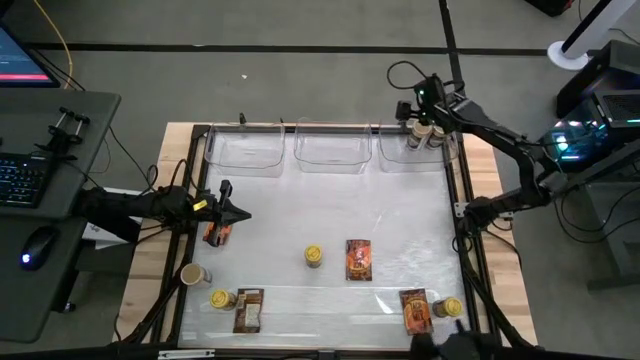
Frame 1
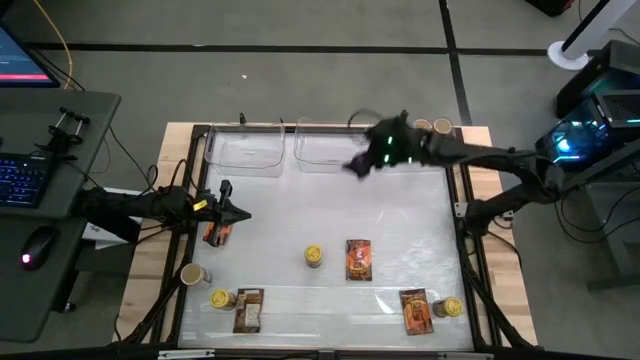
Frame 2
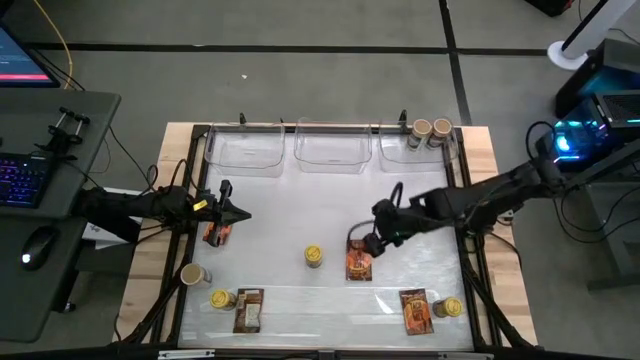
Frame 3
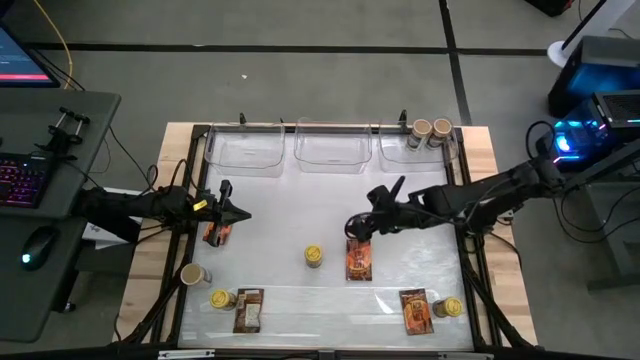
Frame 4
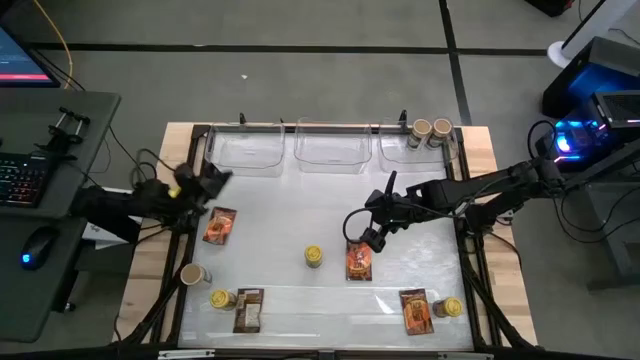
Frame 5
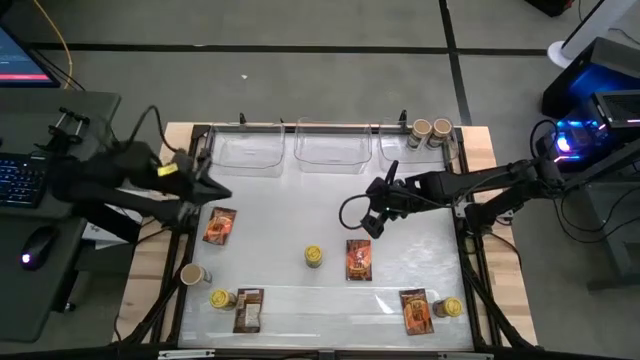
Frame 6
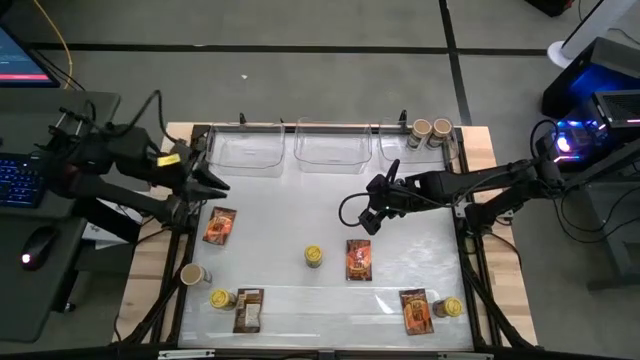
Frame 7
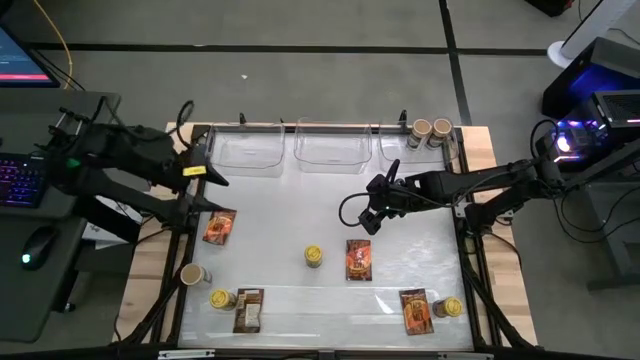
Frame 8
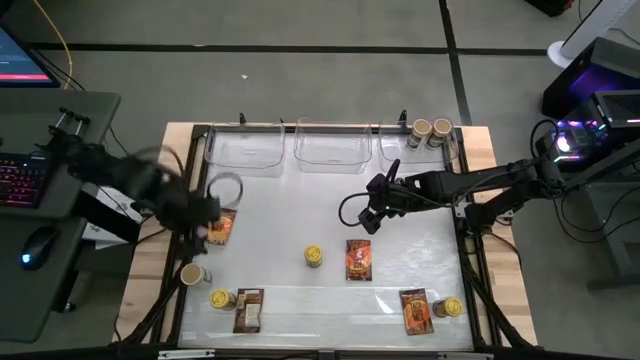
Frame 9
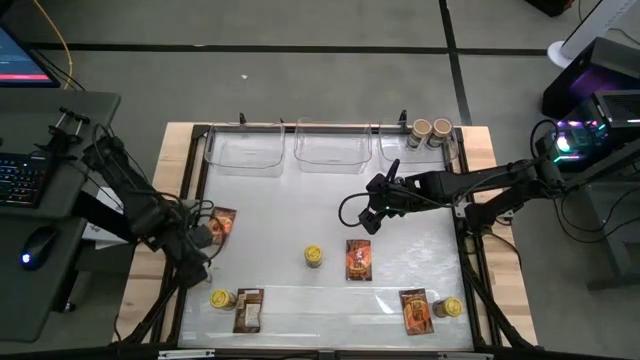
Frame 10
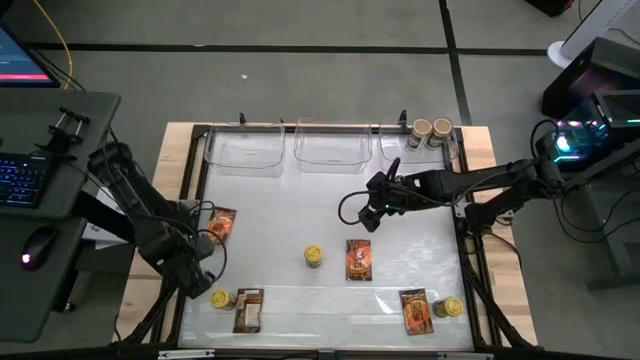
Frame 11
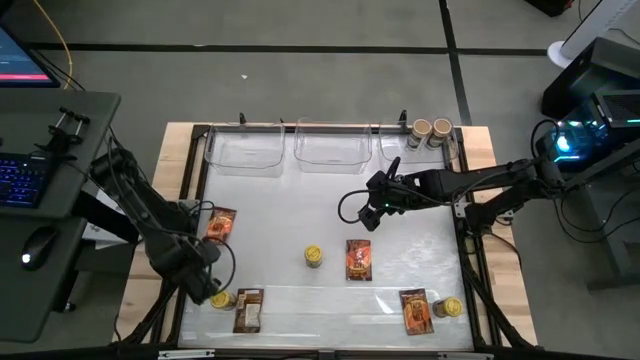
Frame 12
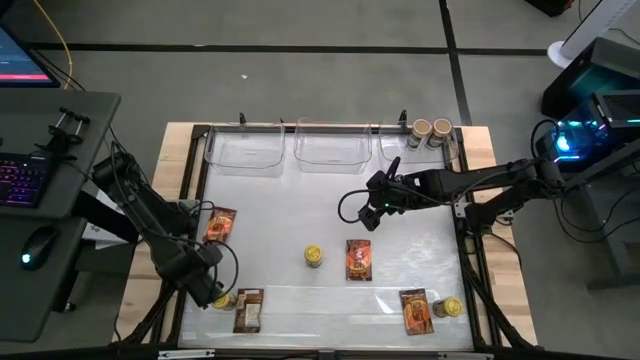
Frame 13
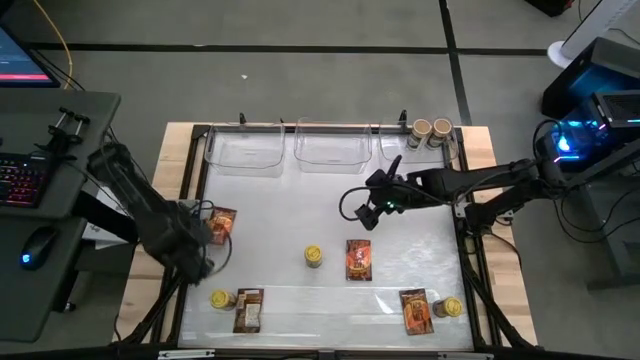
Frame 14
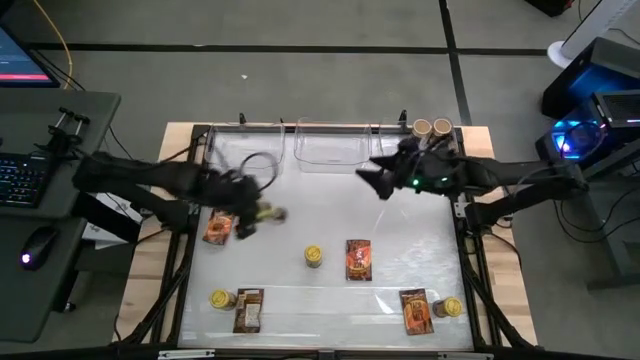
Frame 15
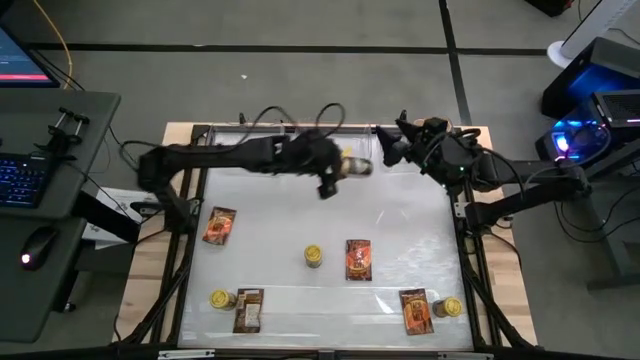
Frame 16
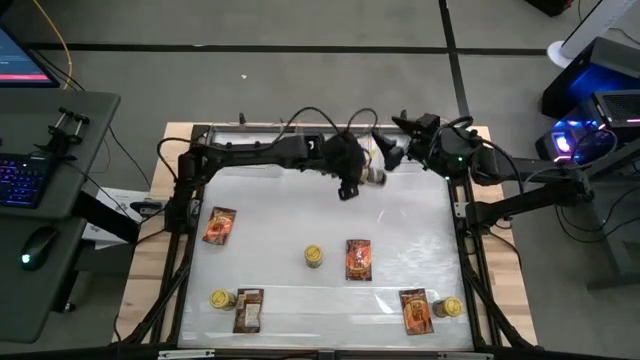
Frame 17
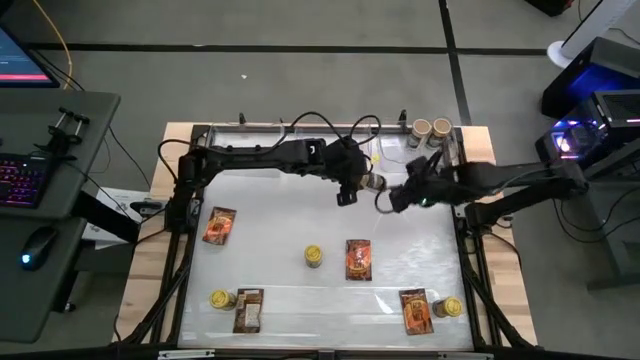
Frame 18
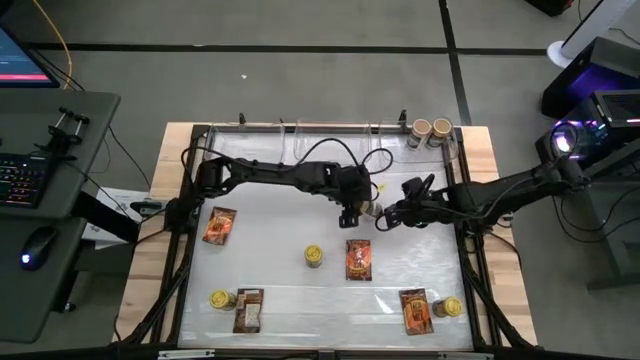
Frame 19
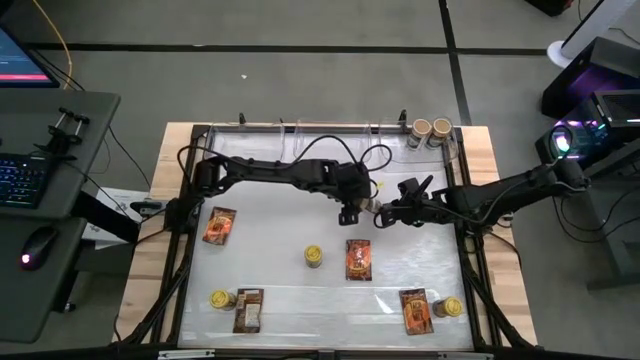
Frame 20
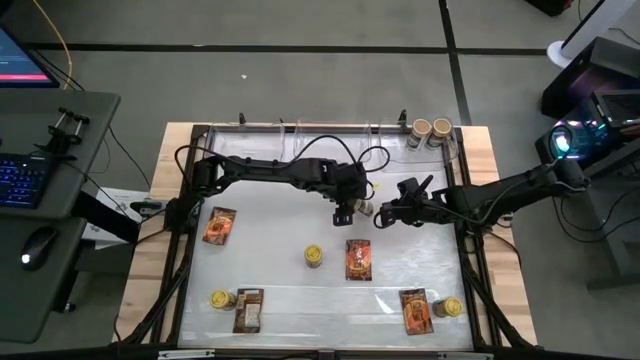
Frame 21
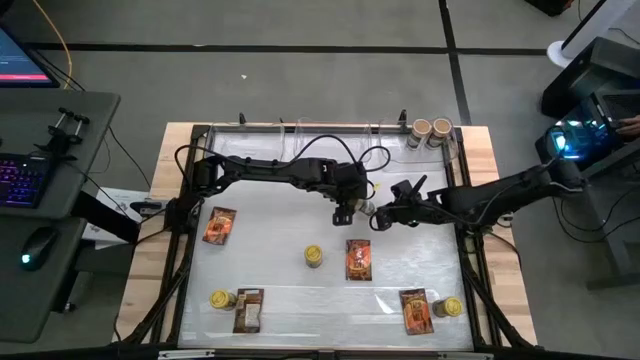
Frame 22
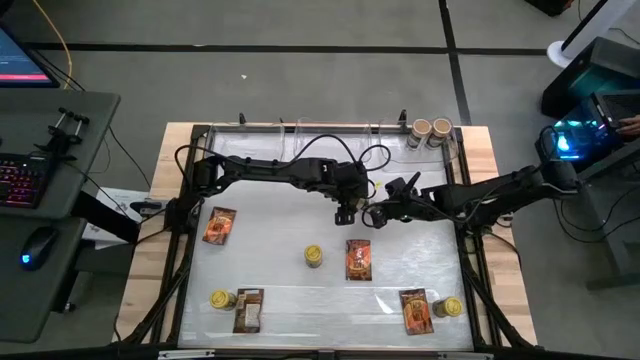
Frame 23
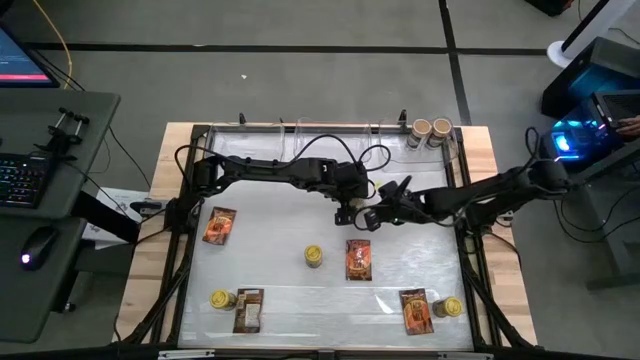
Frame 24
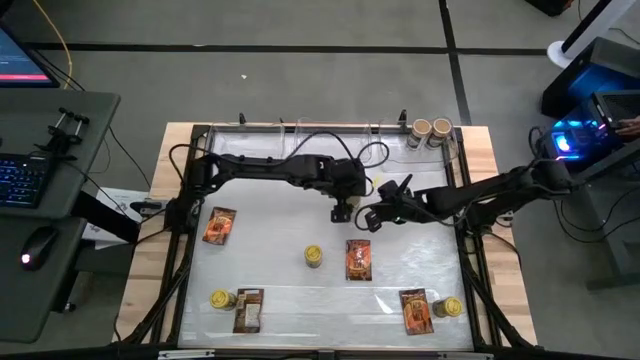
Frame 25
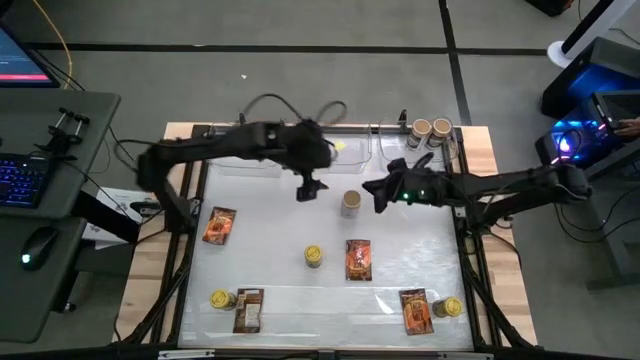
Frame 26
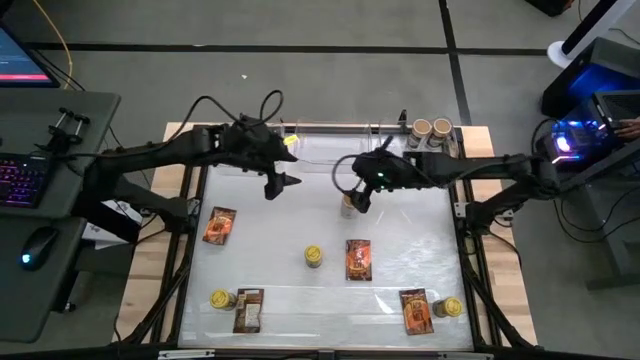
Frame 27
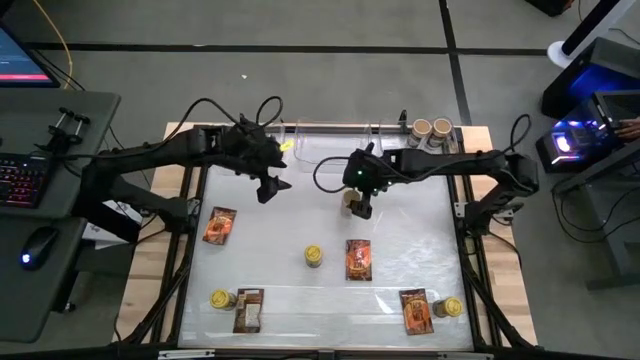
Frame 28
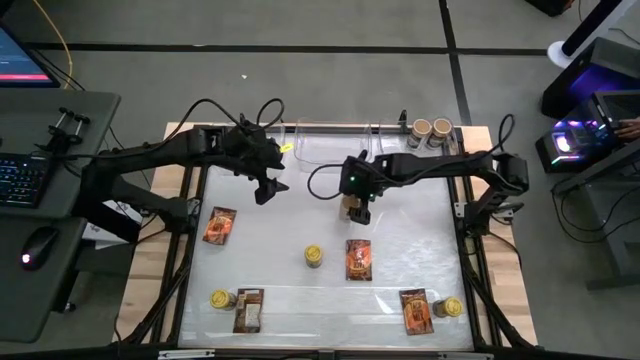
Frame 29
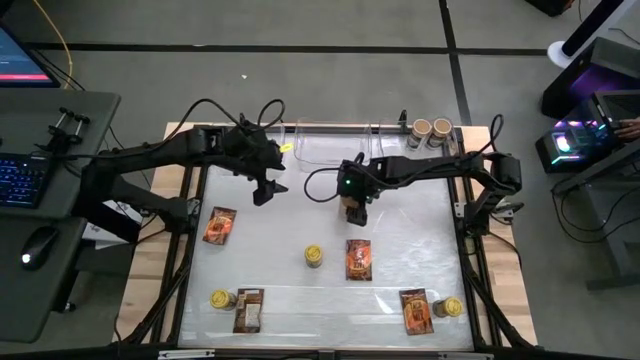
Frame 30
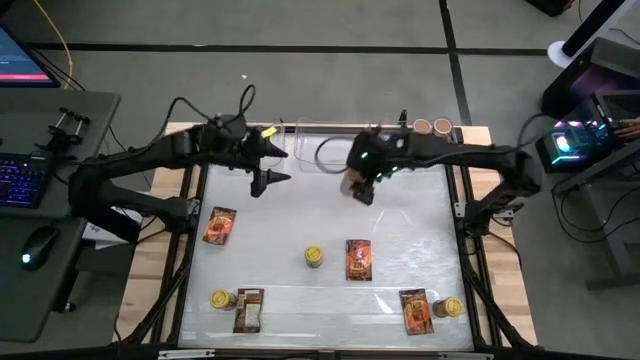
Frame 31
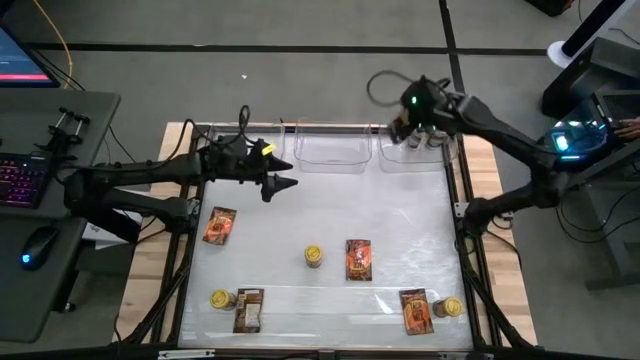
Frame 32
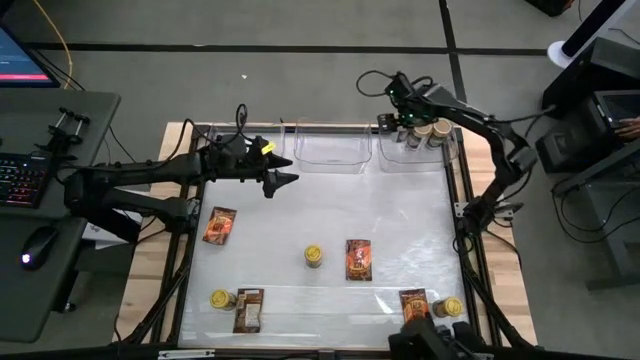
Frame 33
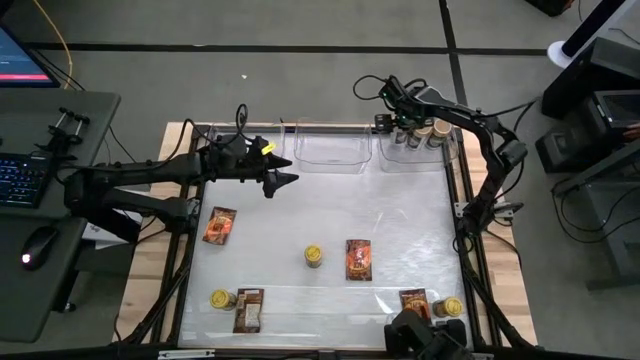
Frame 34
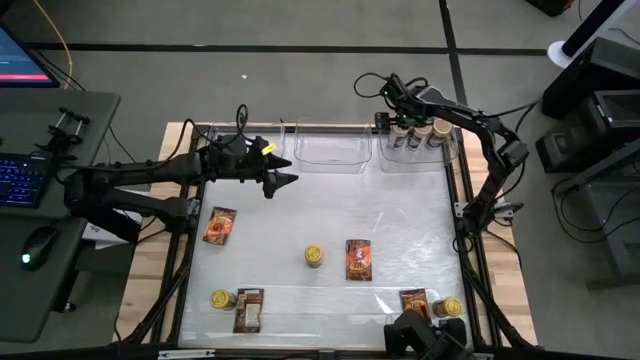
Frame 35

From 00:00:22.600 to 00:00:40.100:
Task: Sort spices by type
Put the gold seasoning bottle into the right transparent bin

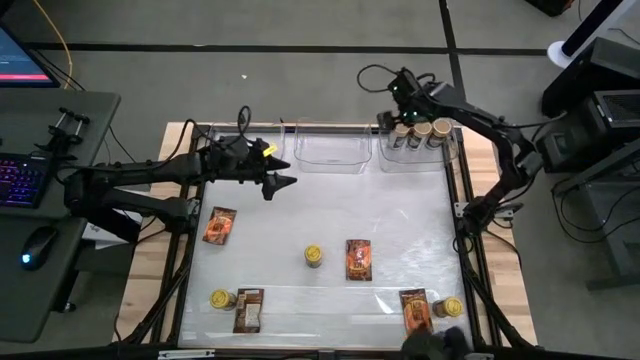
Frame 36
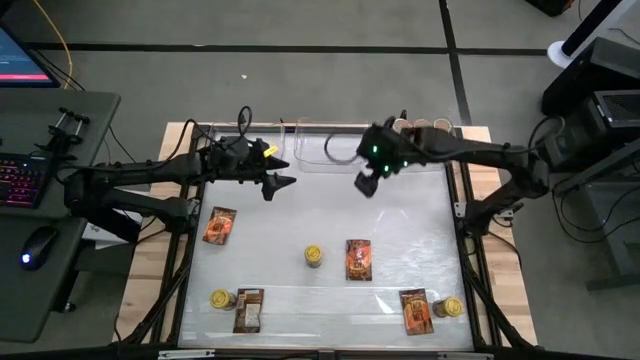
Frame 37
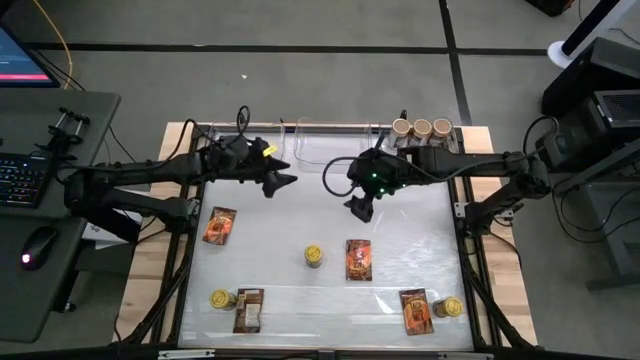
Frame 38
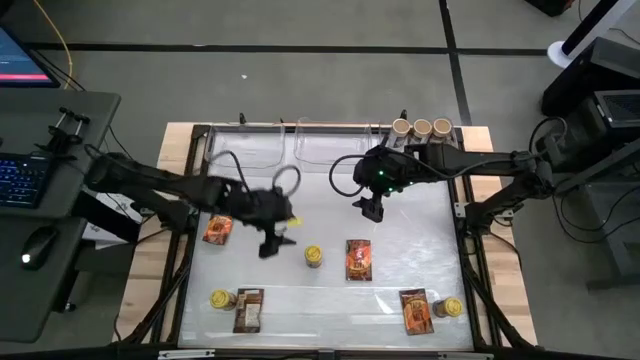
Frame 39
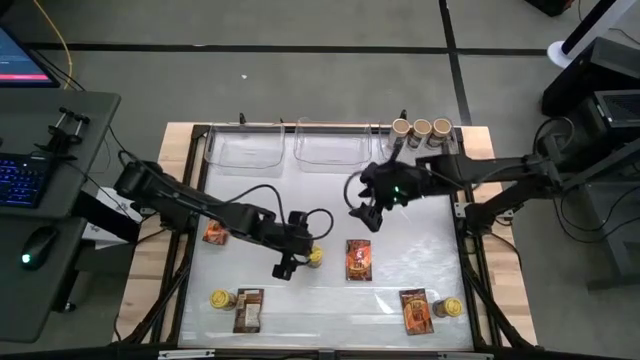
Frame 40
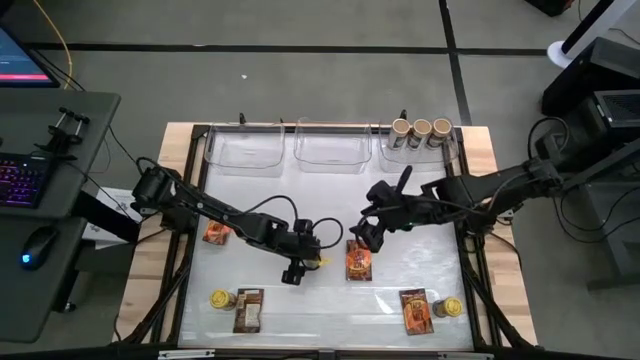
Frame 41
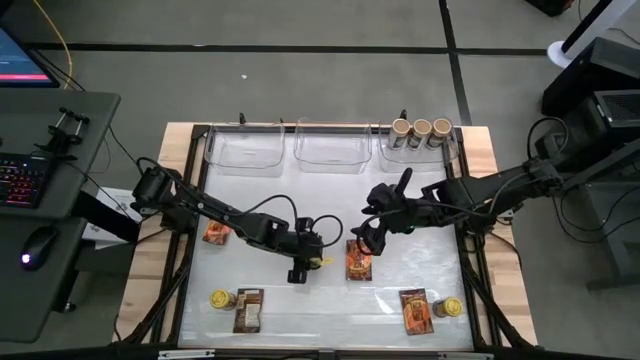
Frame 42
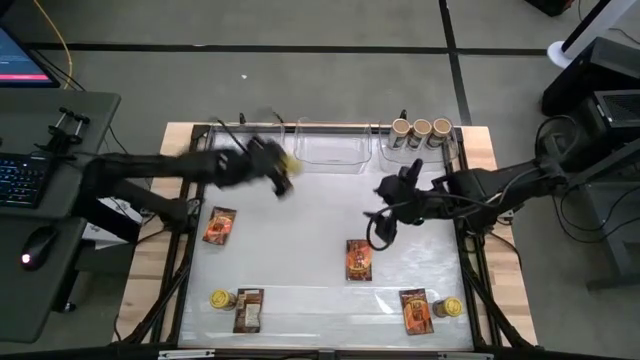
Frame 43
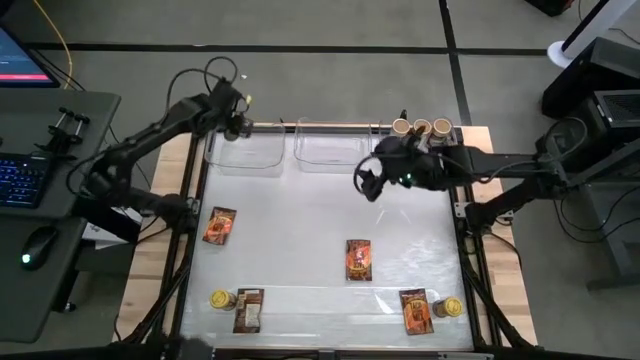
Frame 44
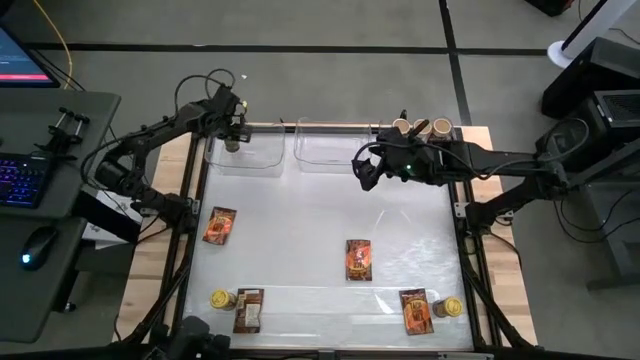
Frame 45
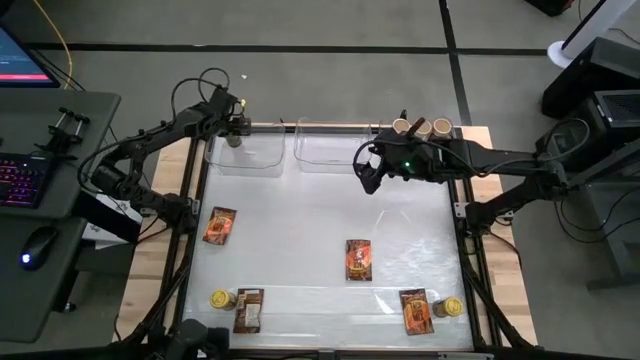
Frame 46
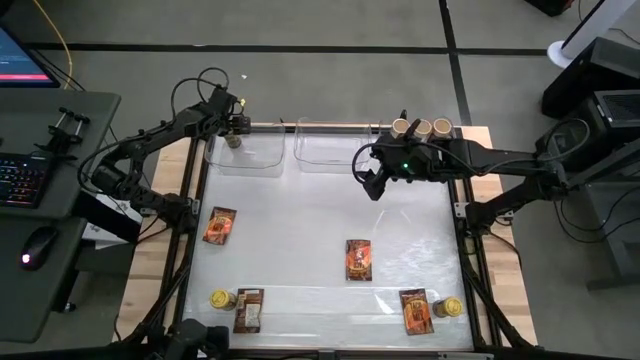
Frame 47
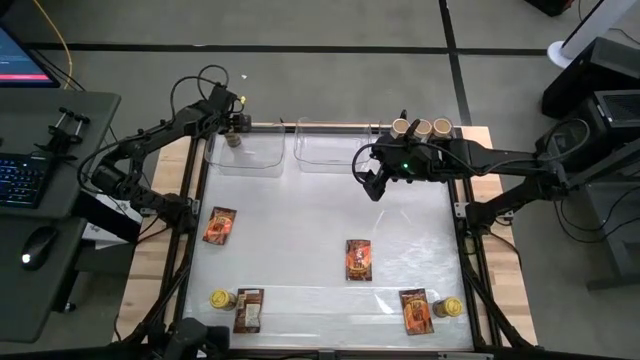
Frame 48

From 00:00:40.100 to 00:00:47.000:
Put the middle yellow seasoning bottle into the left transparent bin
